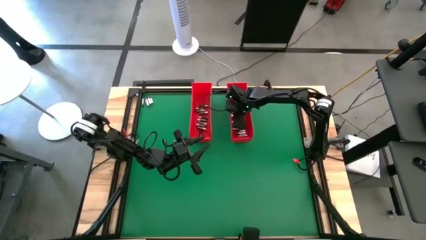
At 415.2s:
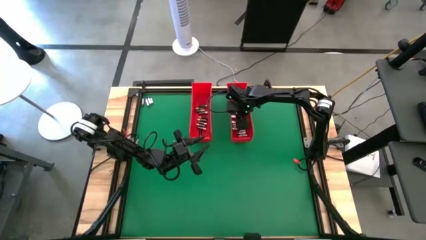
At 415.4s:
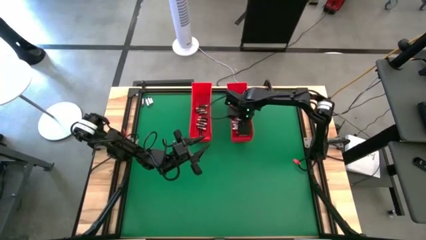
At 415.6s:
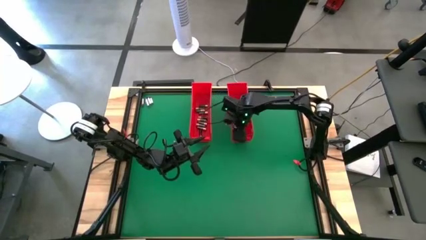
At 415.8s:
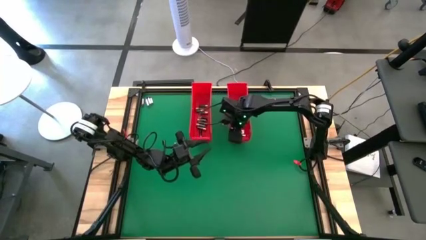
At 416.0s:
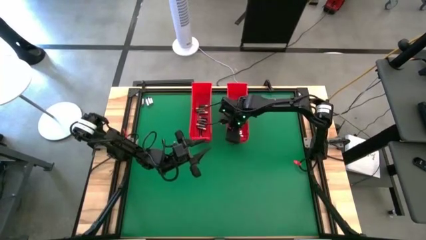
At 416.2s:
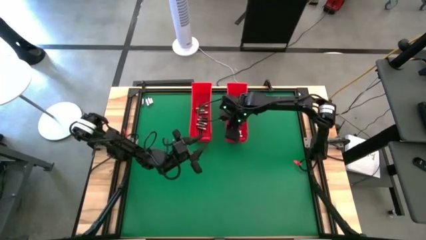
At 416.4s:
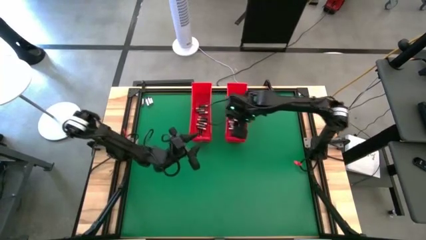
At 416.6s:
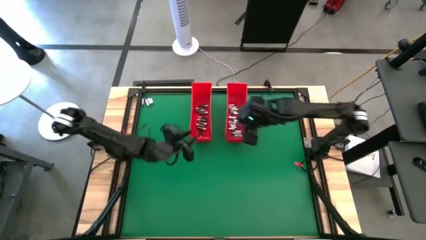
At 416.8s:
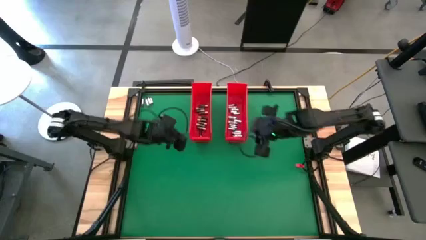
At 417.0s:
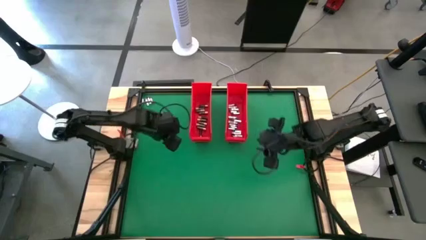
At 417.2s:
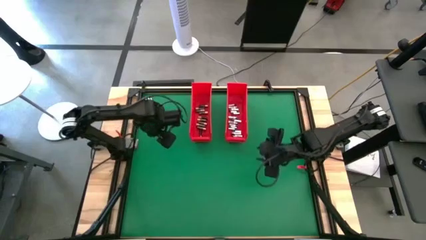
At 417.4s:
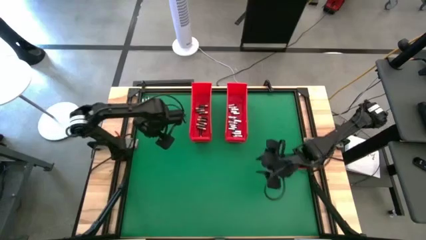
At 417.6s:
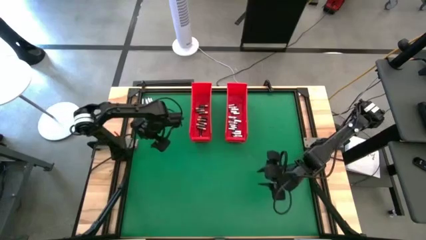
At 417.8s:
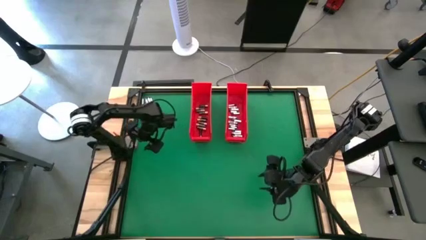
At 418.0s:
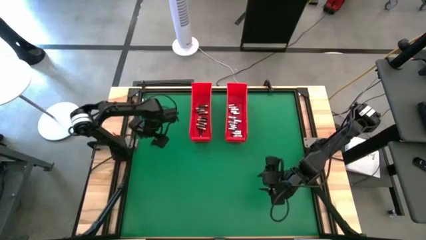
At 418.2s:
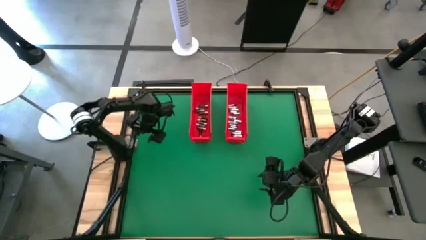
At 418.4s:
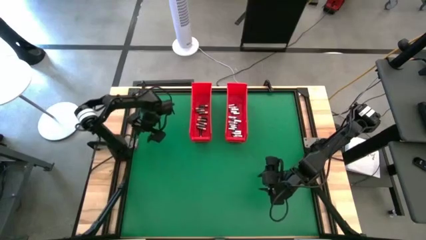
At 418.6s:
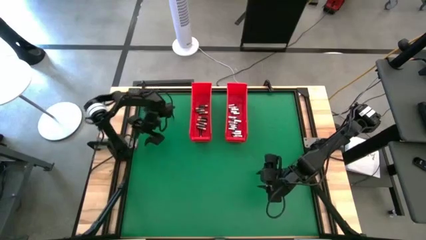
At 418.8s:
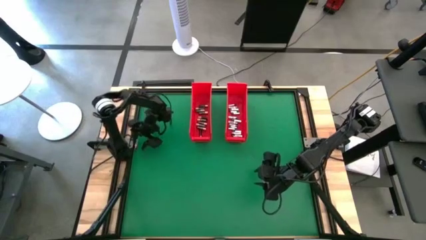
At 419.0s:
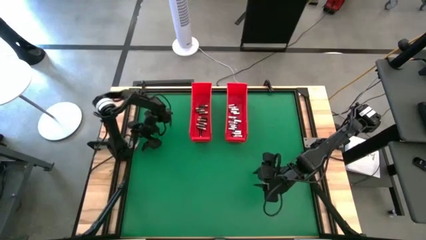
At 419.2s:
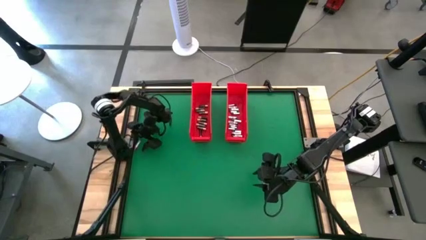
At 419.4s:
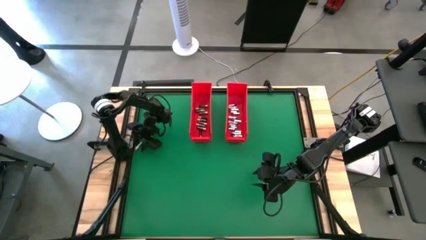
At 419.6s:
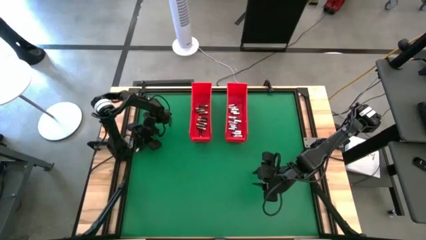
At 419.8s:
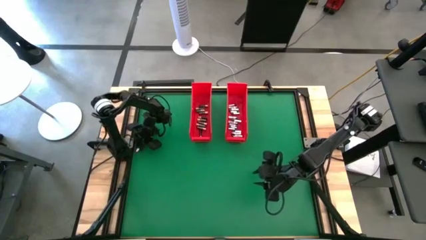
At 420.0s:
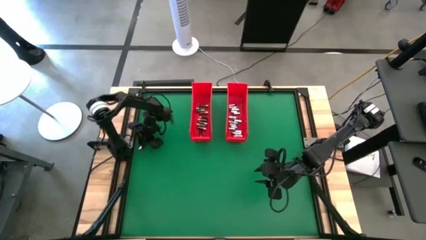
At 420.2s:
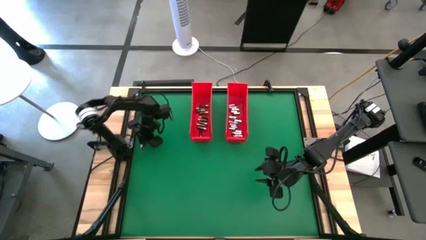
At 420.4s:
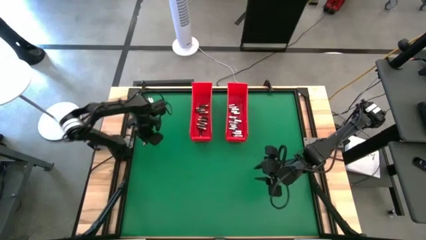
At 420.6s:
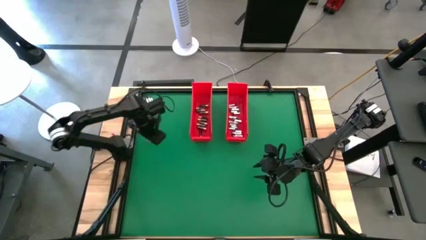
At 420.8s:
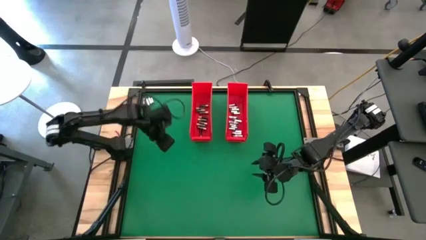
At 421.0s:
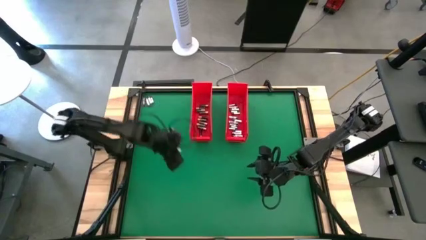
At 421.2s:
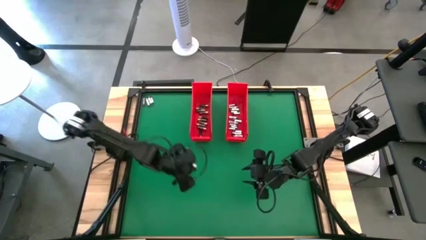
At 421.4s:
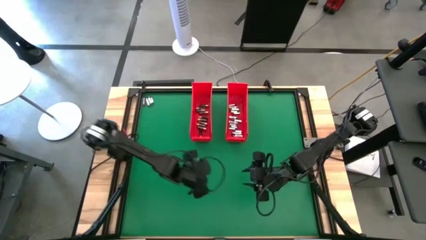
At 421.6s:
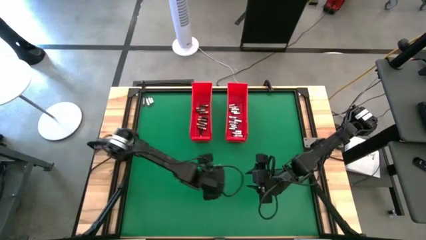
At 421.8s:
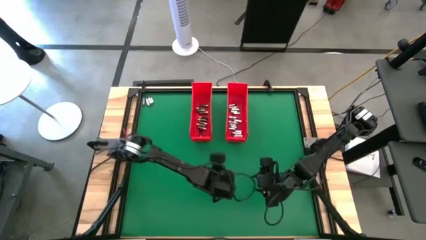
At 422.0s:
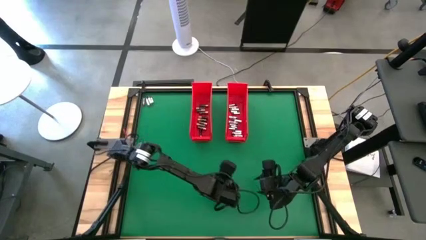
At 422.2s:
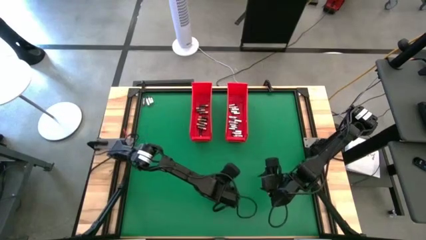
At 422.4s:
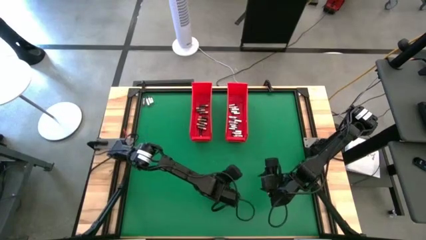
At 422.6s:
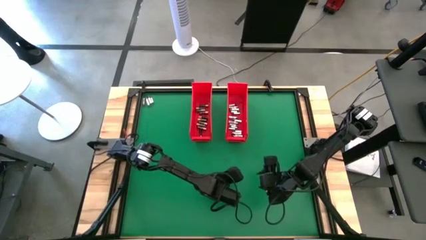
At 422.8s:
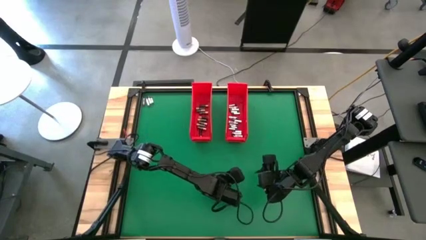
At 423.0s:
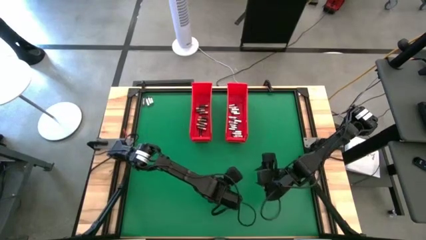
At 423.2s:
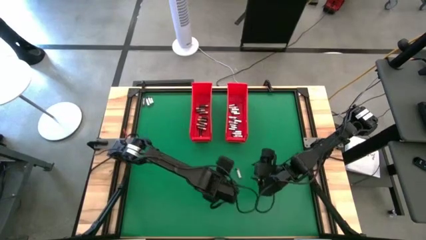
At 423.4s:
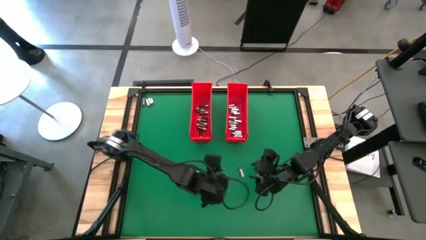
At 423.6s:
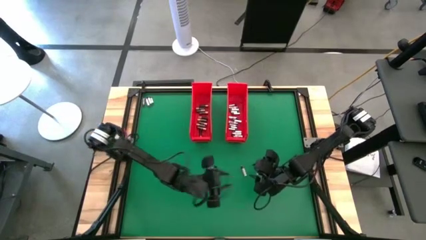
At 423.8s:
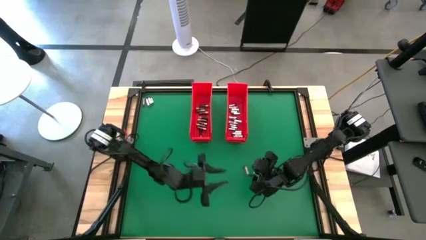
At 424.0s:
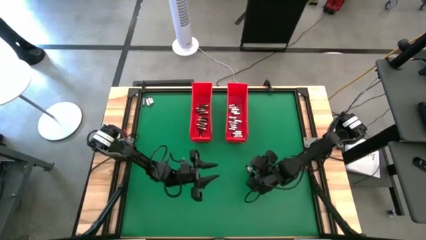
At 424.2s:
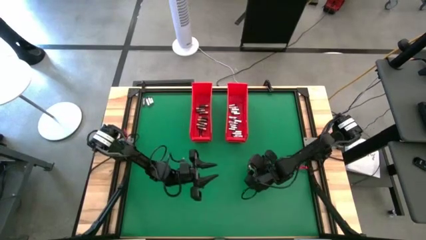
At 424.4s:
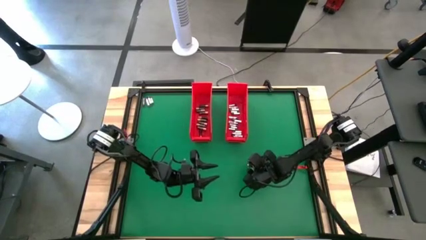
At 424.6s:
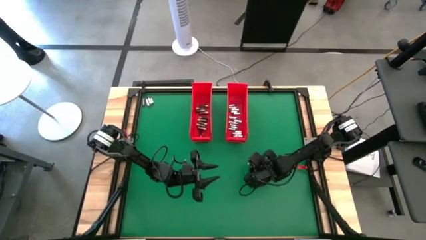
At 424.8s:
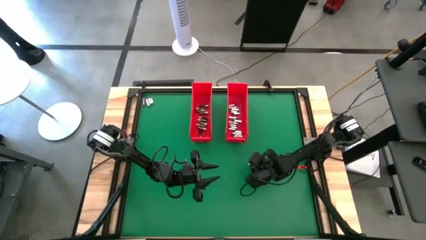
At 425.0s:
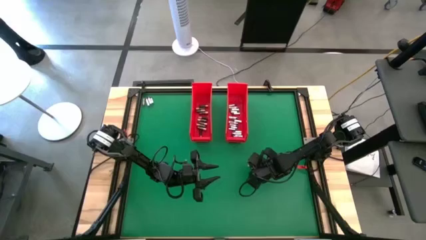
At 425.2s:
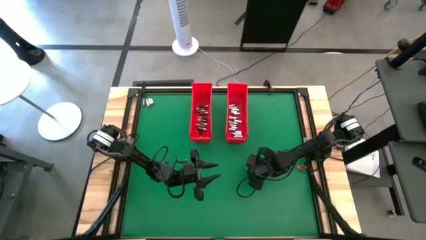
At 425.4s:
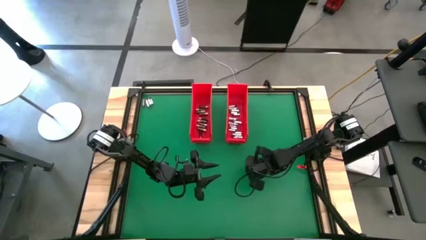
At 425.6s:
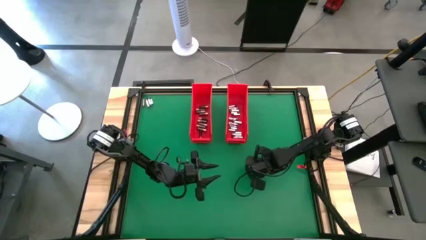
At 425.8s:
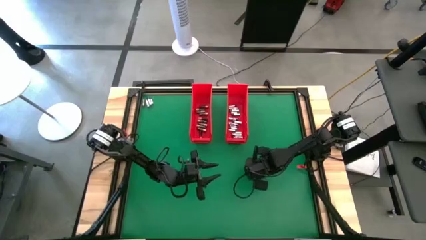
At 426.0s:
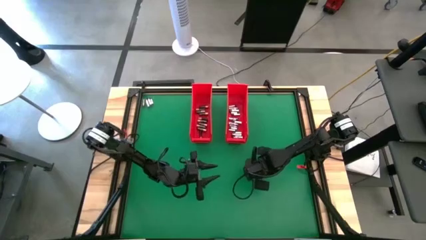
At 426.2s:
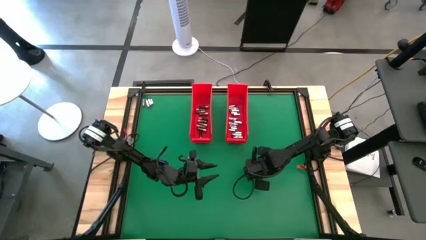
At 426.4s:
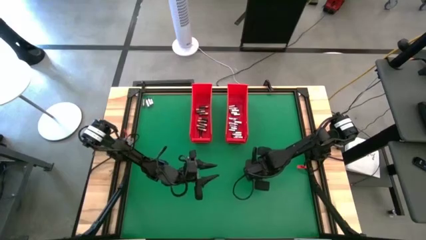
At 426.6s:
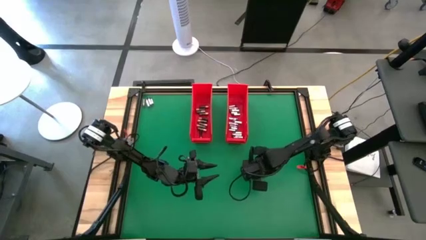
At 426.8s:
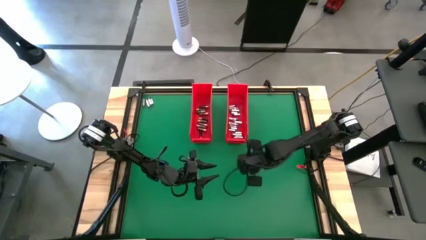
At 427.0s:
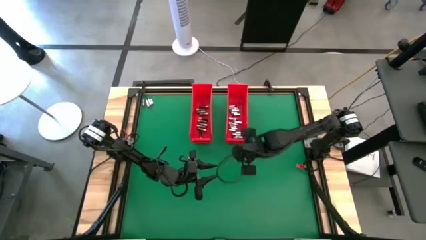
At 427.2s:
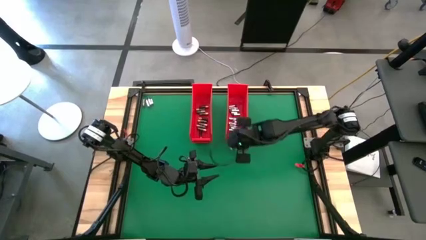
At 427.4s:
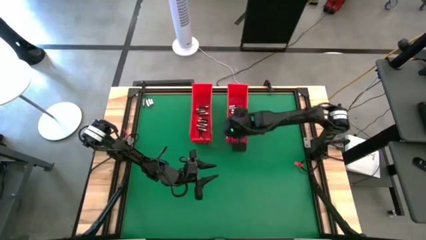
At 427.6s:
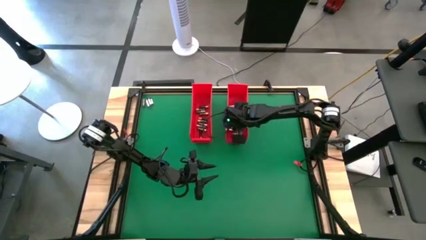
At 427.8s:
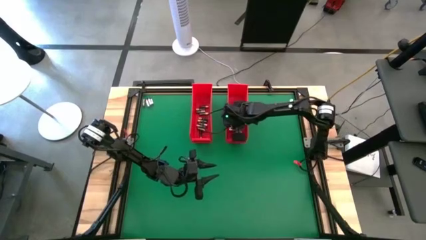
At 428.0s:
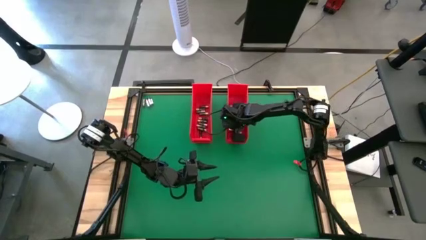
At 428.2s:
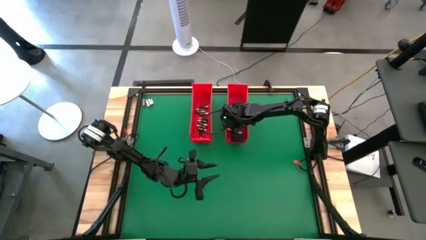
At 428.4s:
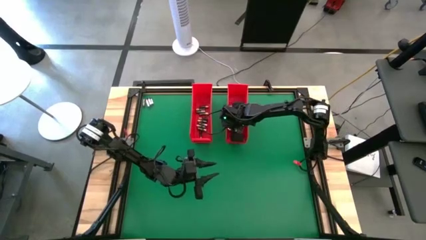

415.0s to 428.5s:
Task: Sort batteries
Put the silver battery into the right red bin

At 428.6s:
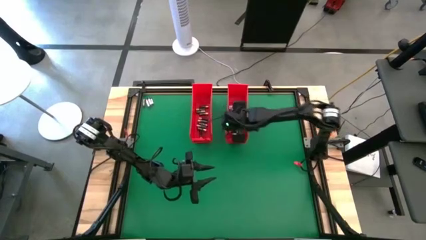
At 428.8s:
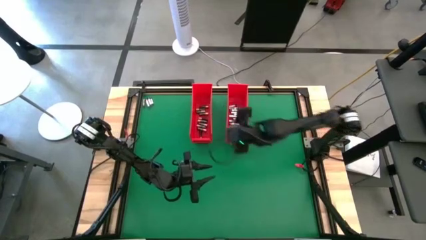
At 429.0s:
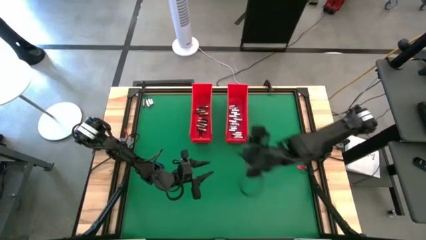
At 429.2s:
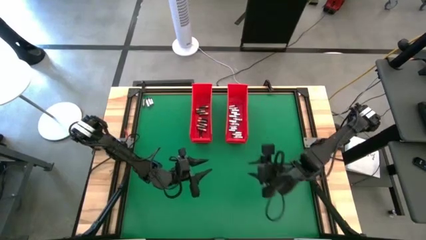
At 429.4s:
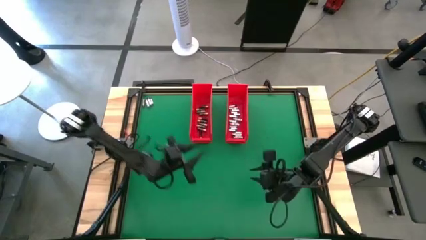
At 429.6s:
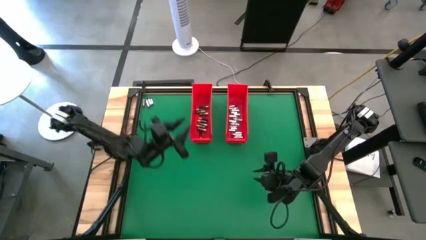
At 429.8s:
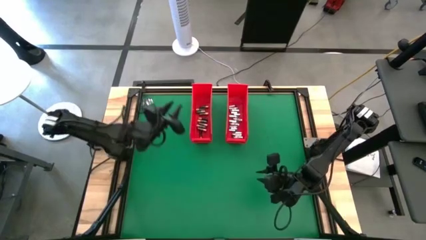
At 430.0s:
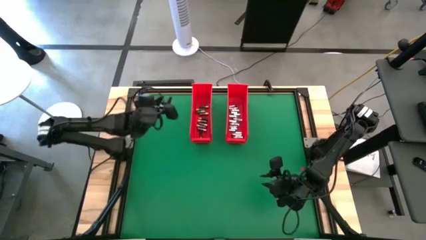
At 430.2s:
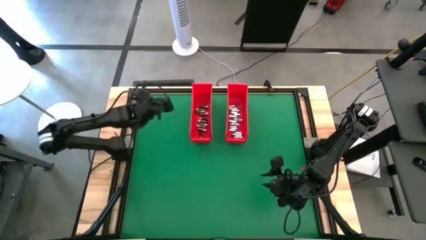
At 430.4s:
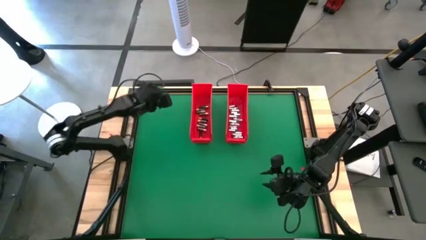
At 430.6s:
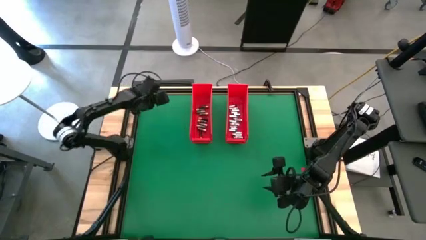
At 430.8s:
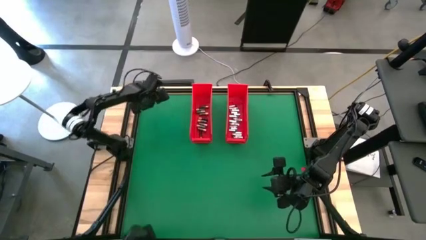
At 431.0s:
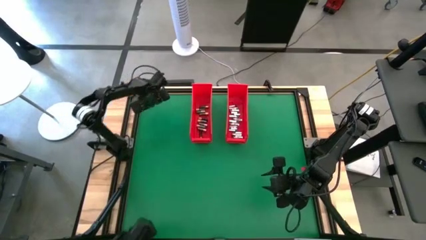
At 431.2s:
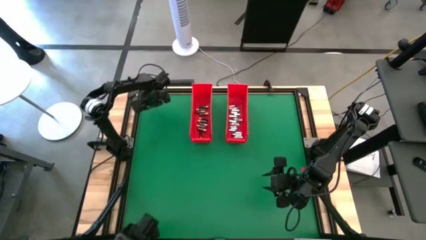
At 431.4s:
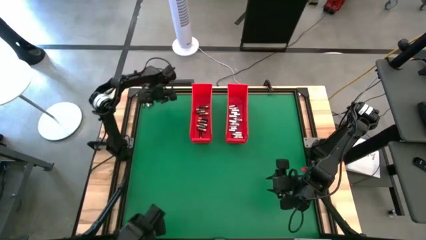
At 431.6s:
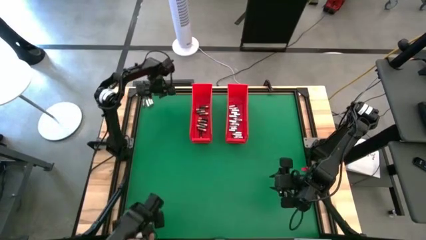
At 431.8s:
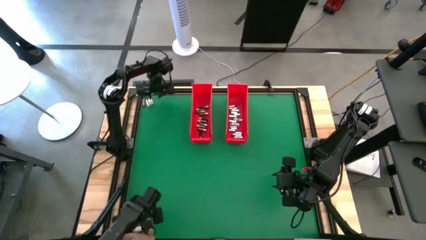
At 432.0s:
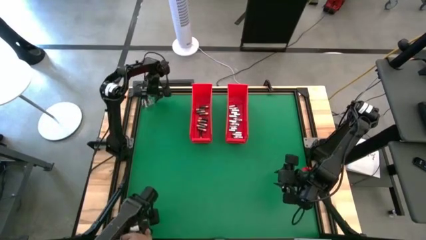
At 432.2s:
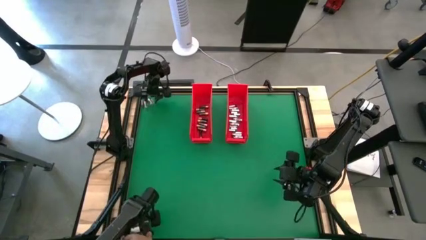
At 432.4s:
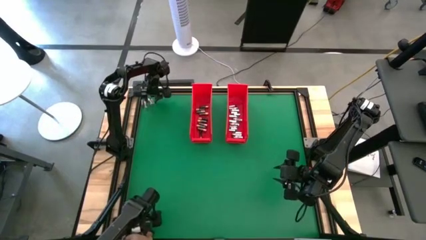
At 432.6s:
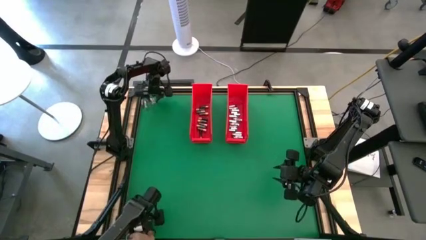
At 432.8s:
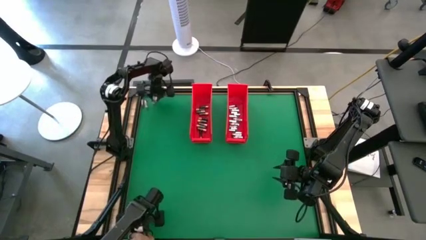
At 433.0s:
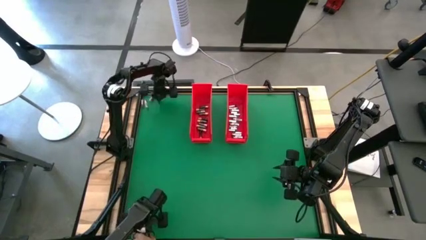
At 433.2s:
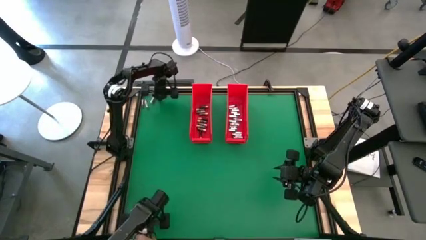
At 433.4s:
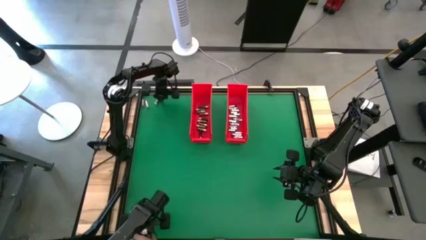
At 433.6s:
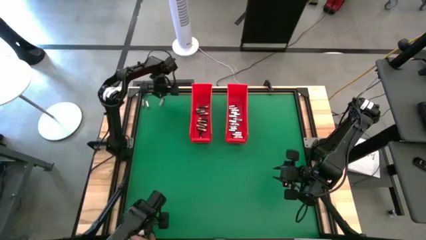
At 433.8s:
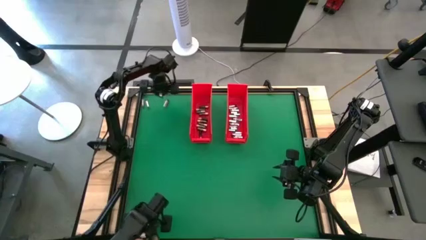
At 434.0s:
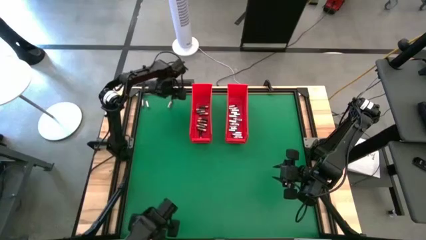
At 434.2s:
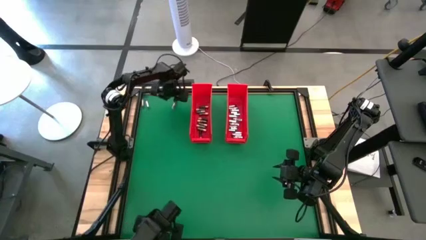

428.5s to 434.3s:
Put the silver battery into the right red bin
